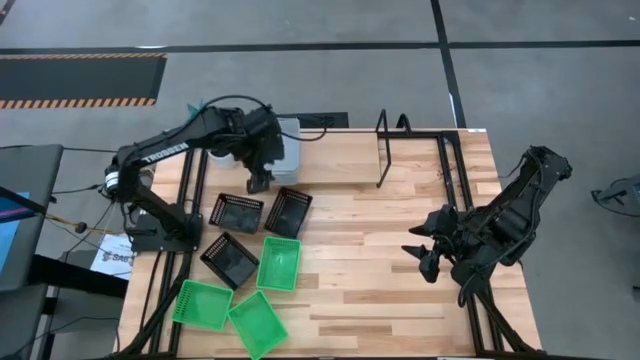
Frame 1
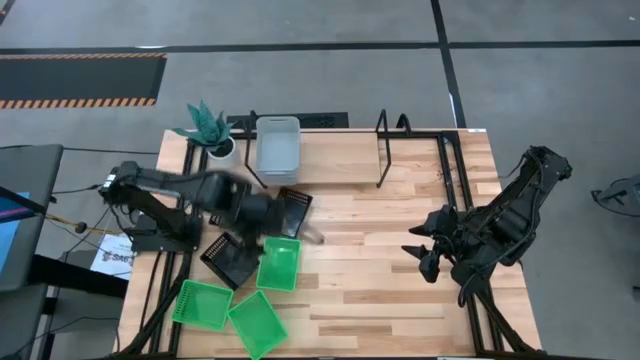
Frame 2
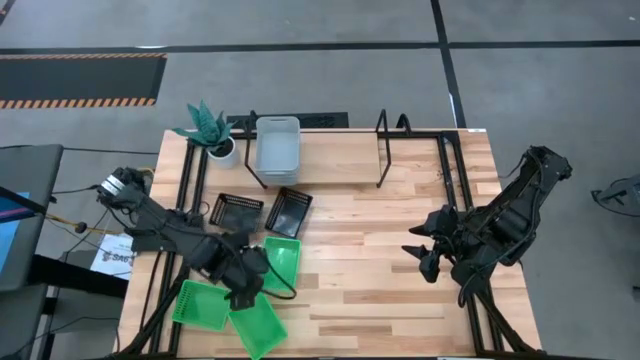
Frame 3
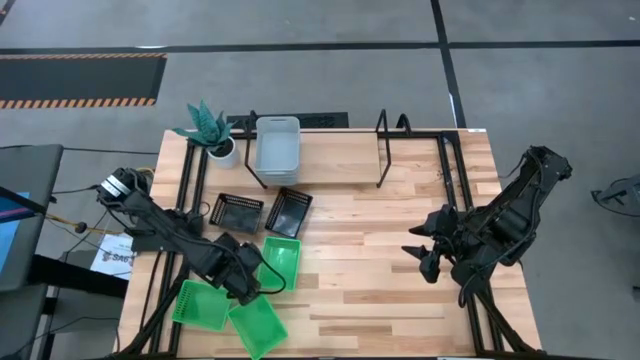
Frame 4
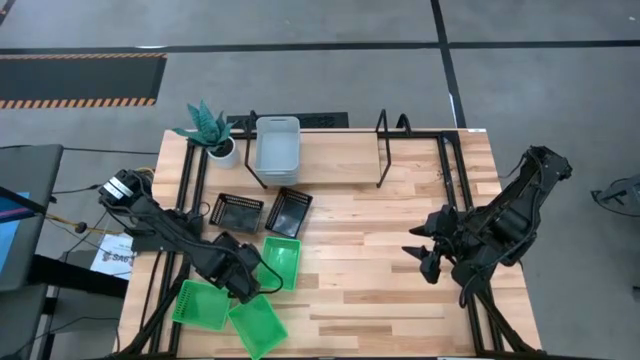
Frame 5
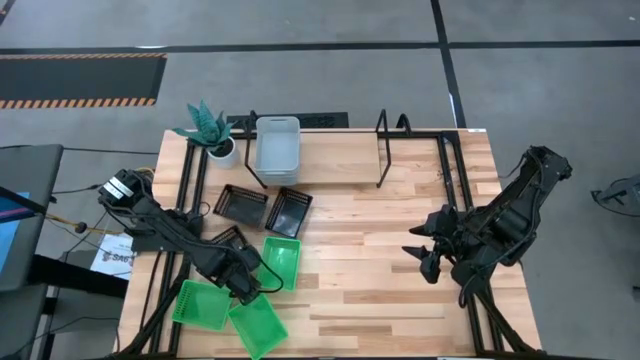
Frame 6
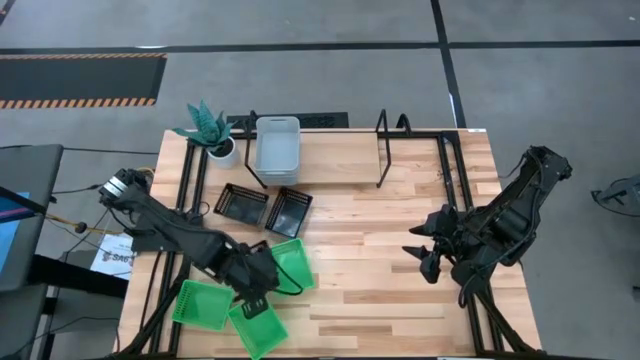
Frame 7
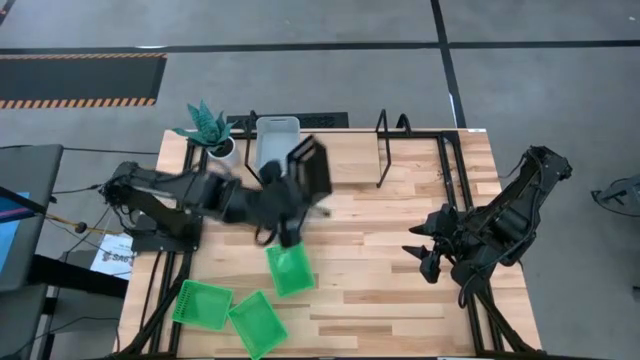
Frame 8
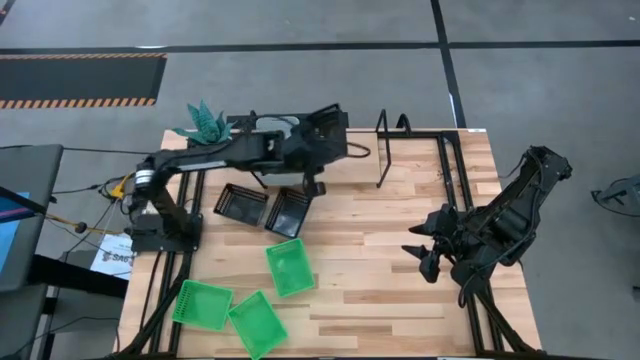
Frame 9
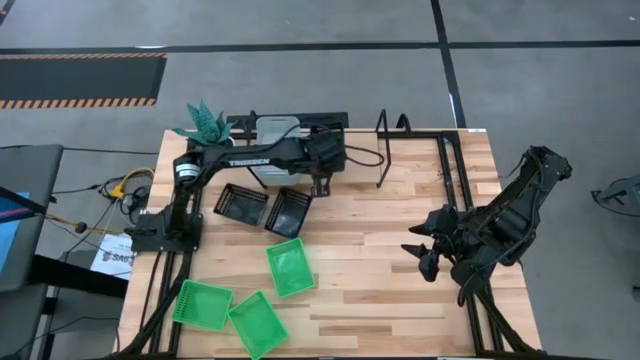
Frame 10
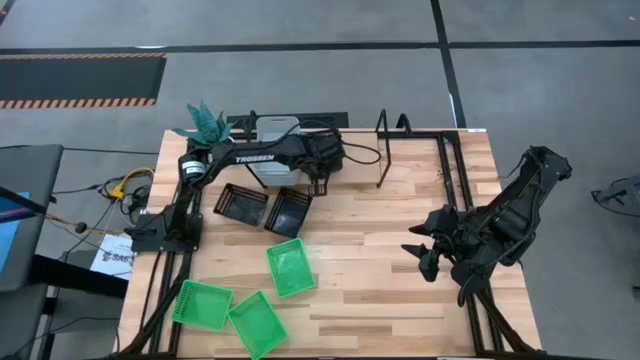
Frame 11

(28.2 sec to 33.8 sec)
Task: Stack baskets on shelf by color
Put the bottom left black bin on the shelf

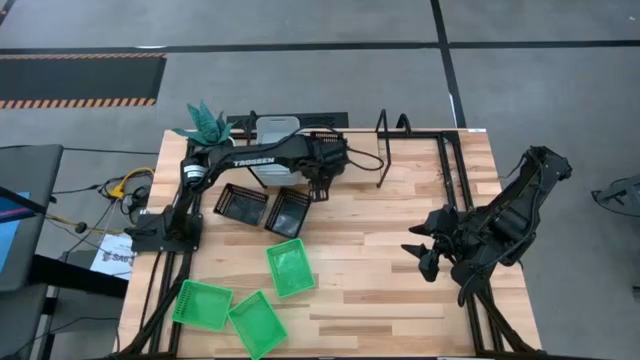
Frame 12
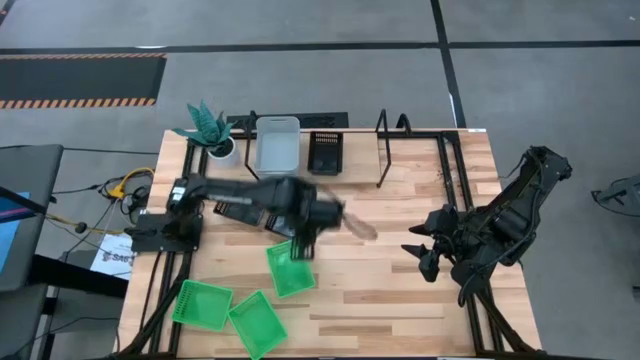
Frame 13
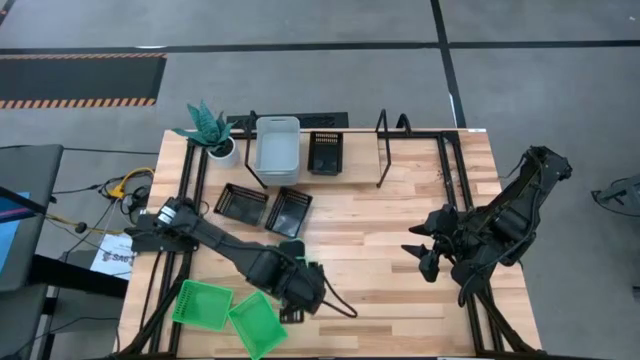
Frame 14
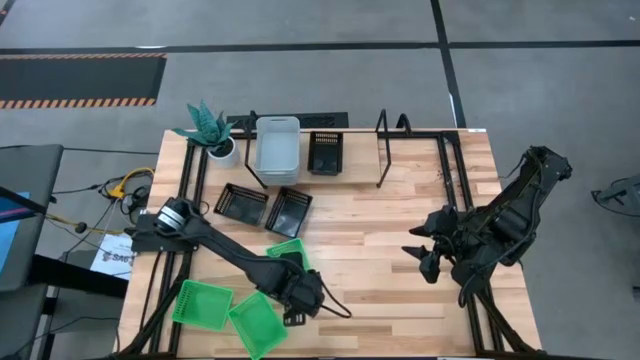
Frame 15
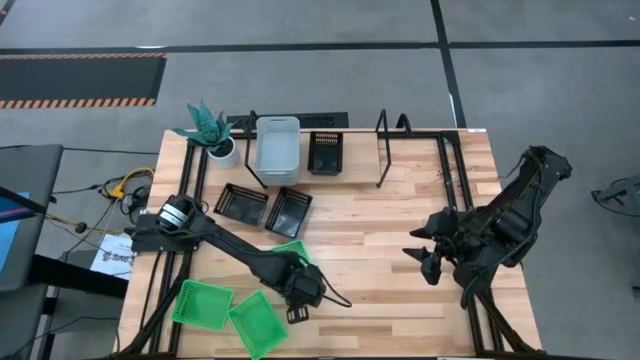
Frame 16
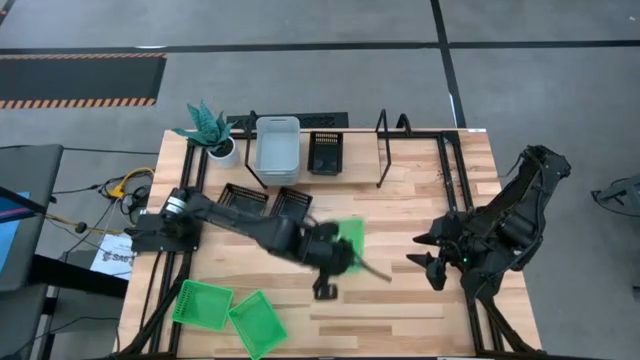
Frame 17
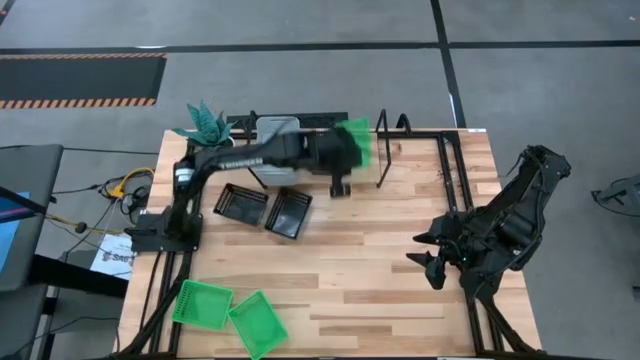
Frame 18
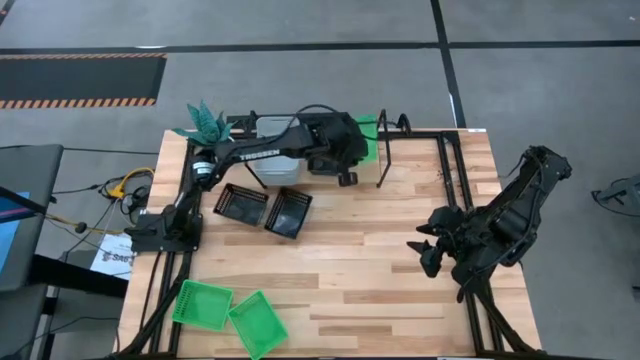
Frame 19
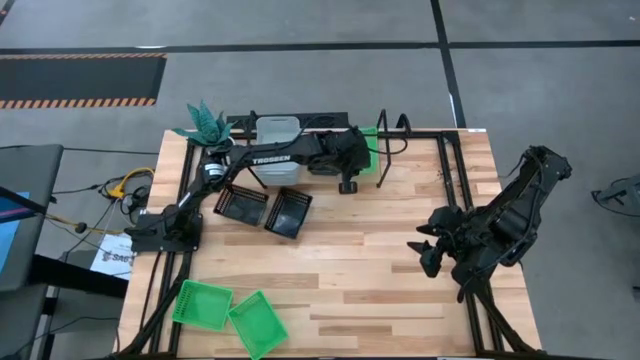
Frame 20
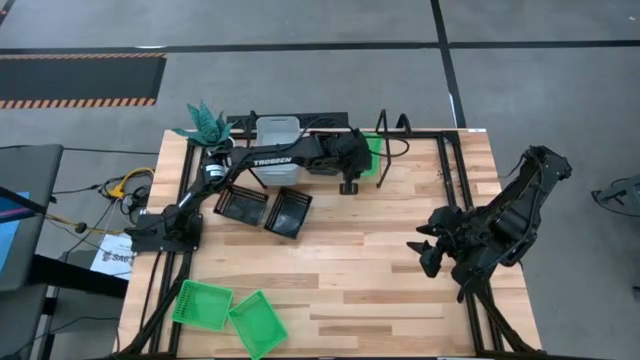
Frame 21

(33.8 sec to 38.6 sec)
Put the top right green bin on the shelf

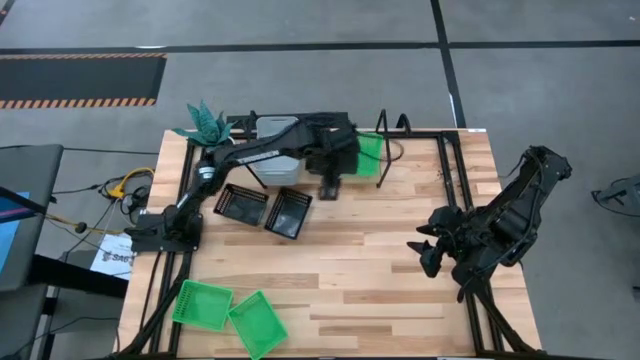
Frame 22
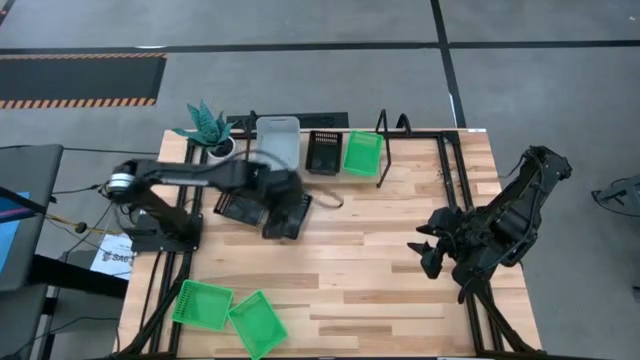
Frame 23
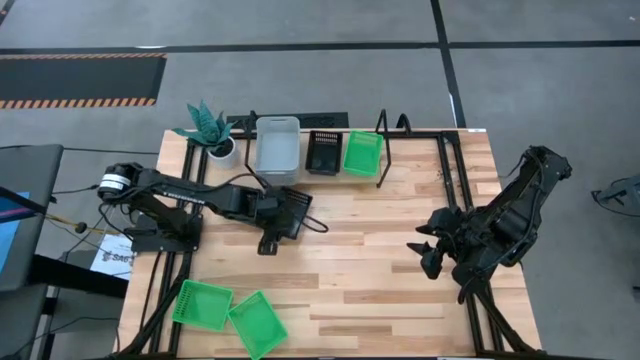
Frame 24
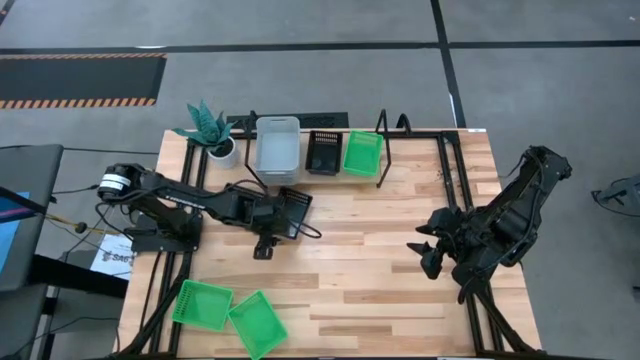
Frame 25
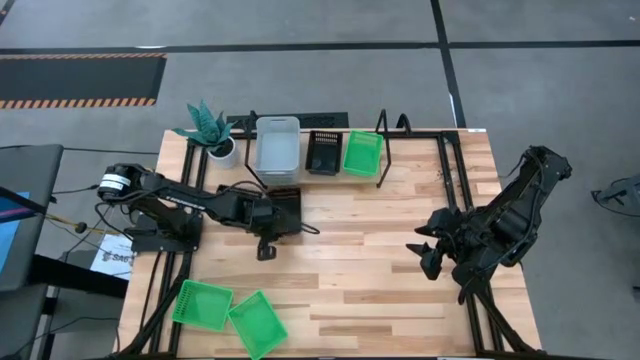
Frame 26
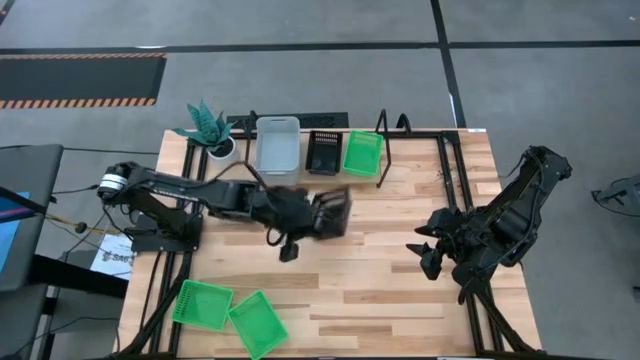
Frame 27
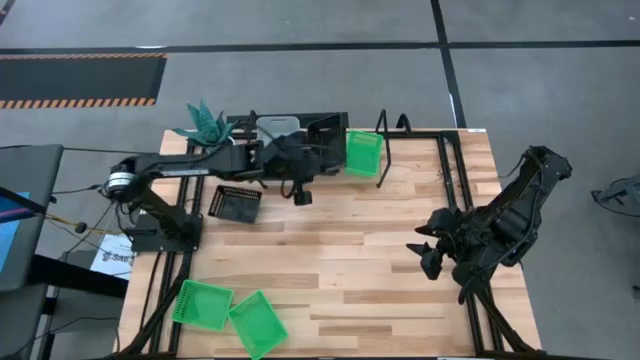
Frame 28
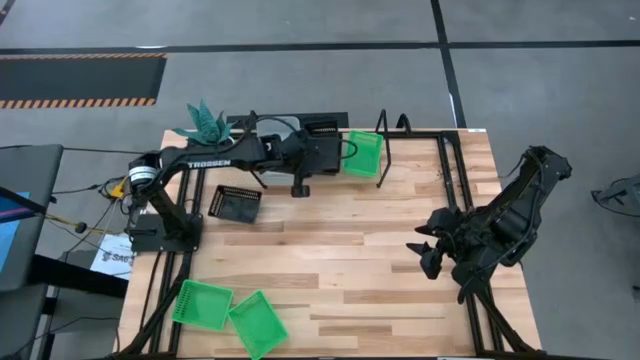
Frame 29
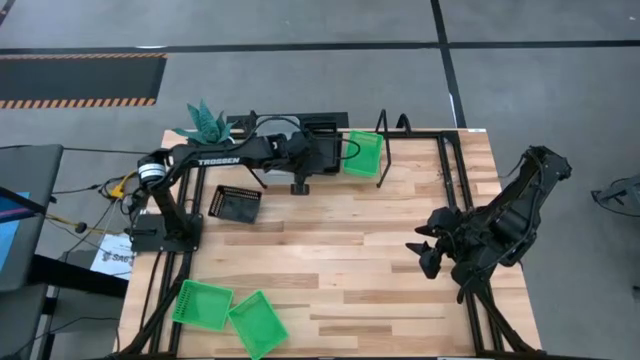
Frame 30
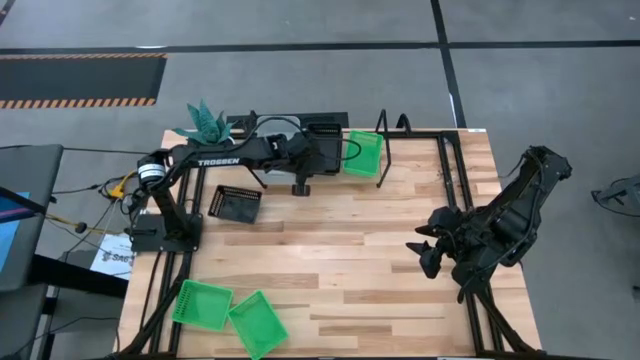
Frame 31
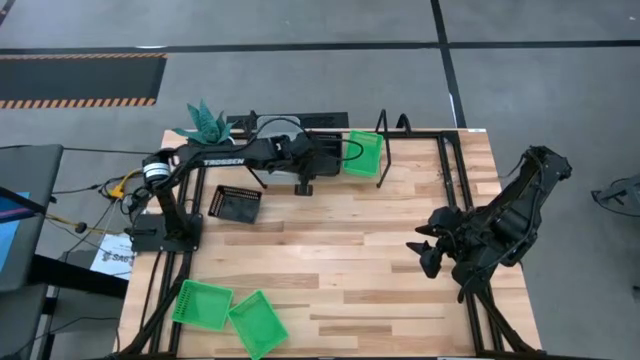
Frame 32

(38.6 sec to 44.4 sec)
Stack the right black bin on top of the black bin on the shelf

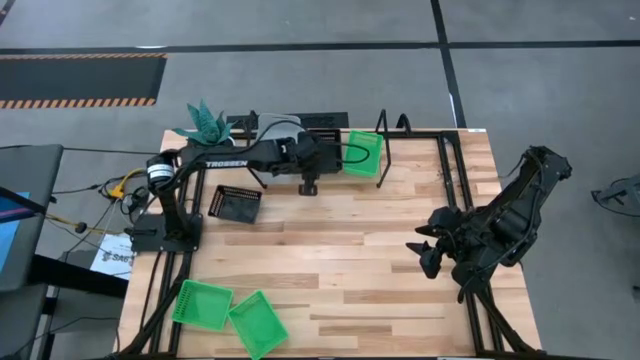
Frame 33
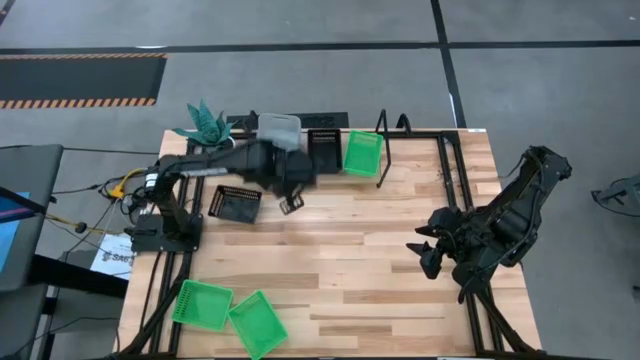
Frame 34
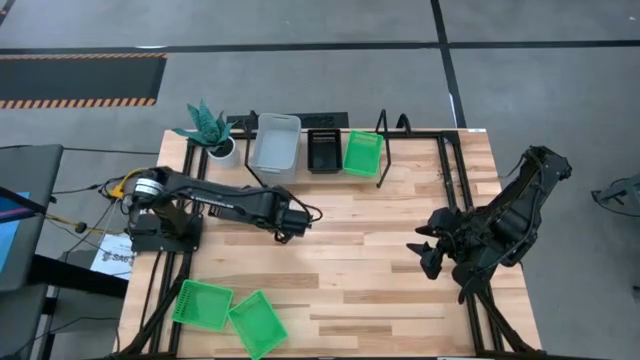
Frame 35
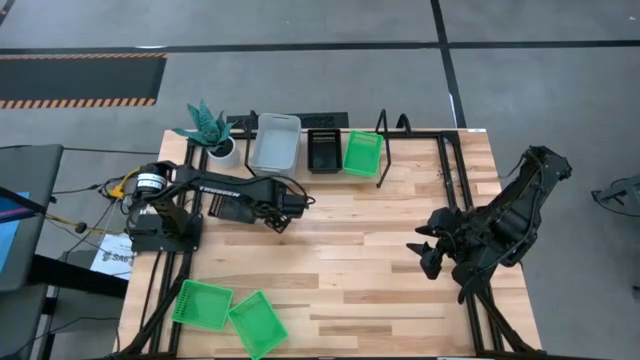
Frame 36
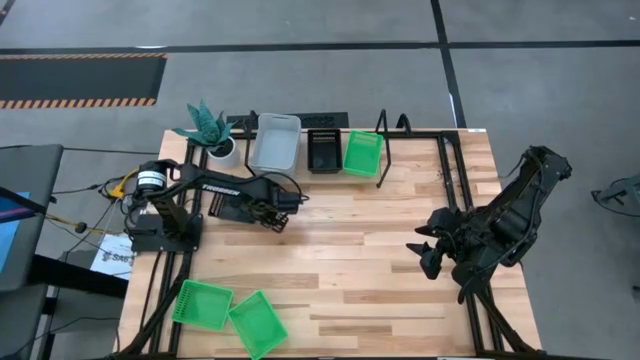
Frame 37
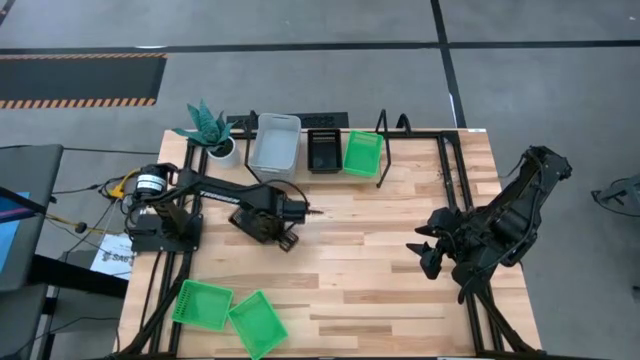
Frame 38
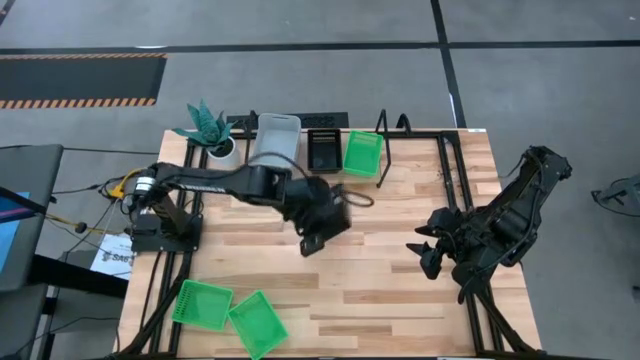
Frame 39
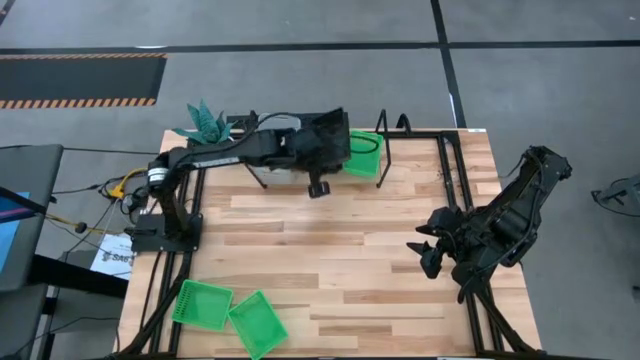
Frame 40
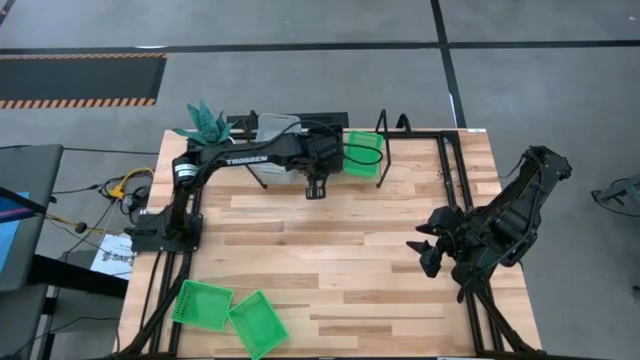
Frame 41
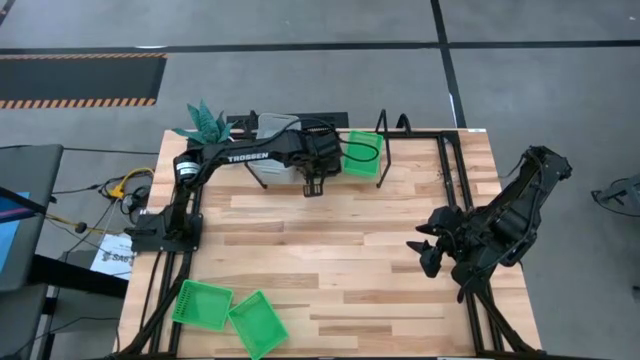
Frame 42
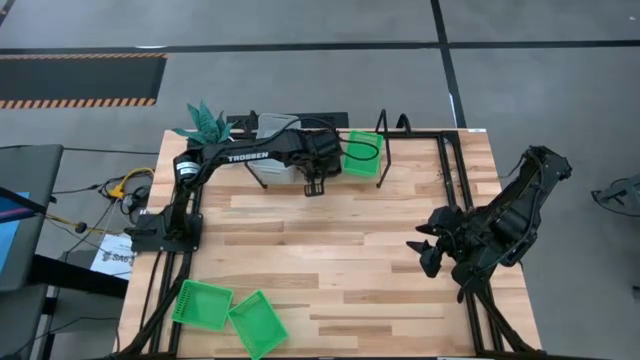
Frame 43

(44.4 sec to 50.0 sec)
Stack the black bin on top of the black bin on the shelf
